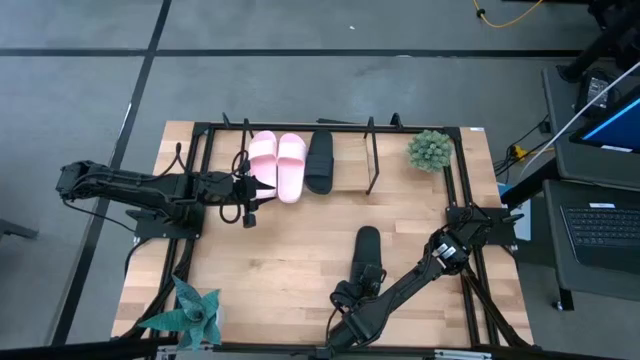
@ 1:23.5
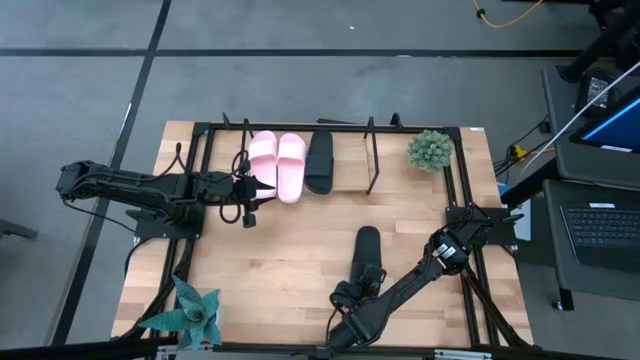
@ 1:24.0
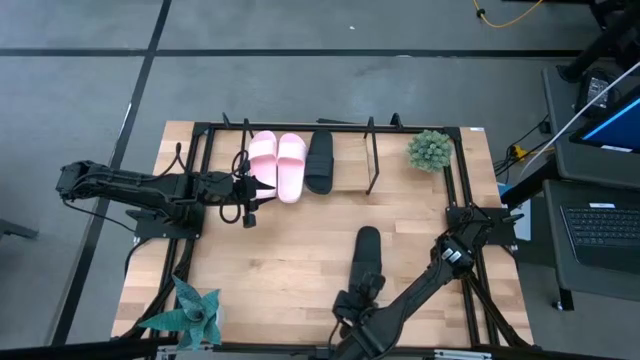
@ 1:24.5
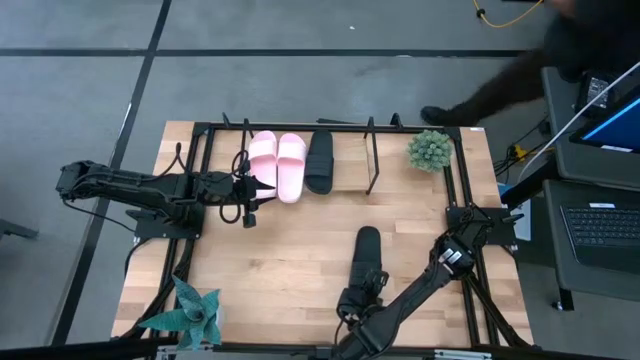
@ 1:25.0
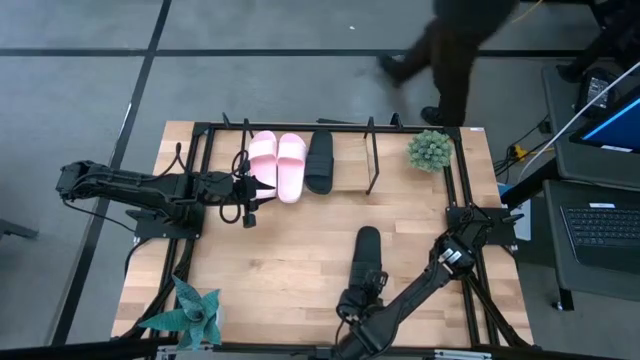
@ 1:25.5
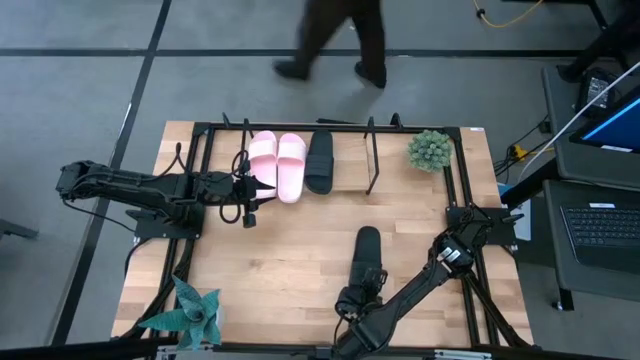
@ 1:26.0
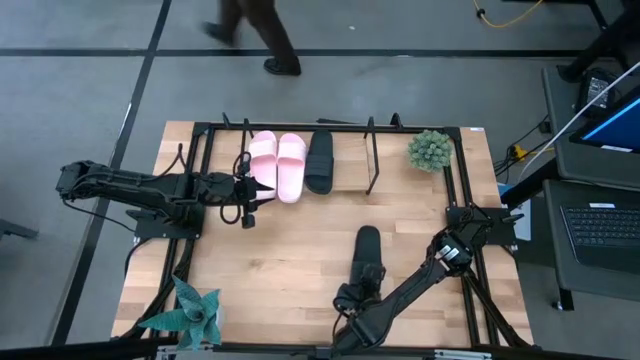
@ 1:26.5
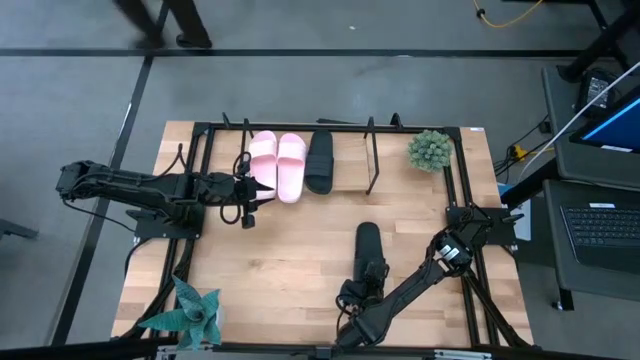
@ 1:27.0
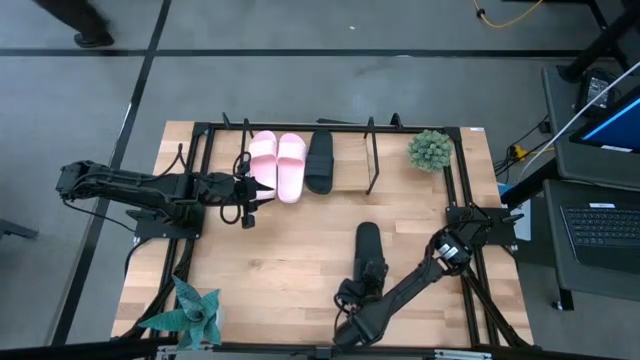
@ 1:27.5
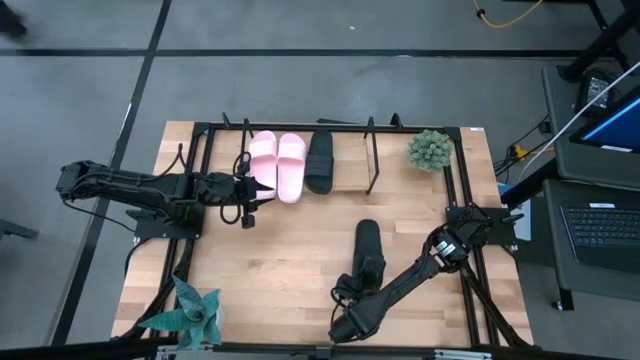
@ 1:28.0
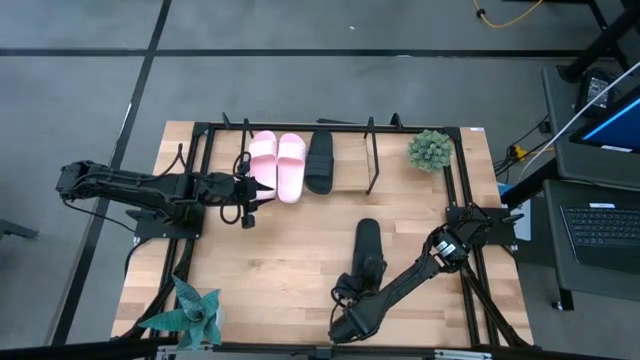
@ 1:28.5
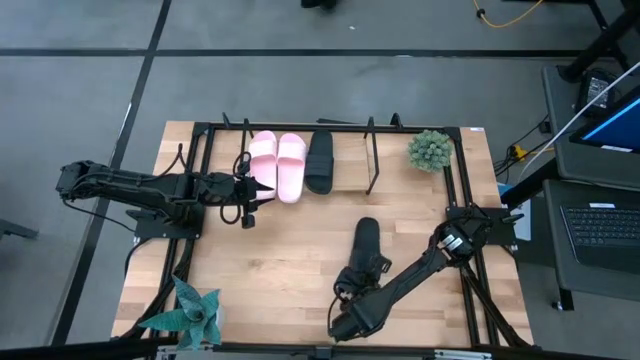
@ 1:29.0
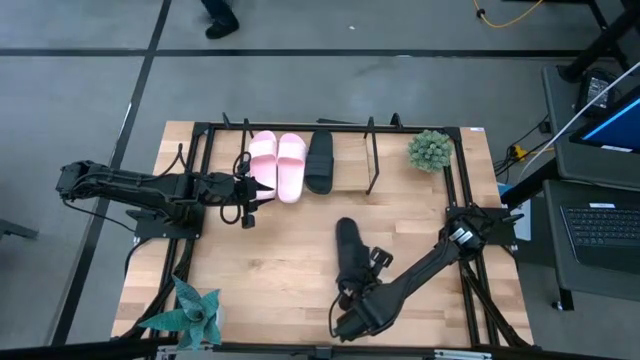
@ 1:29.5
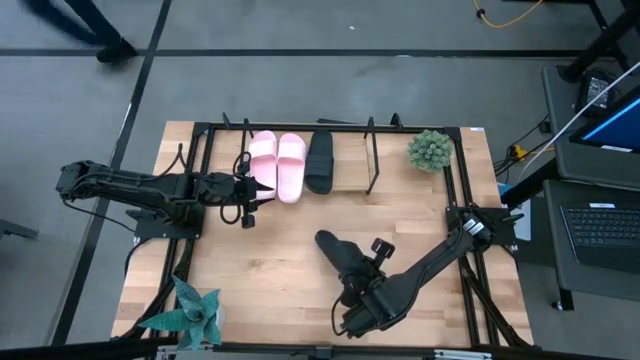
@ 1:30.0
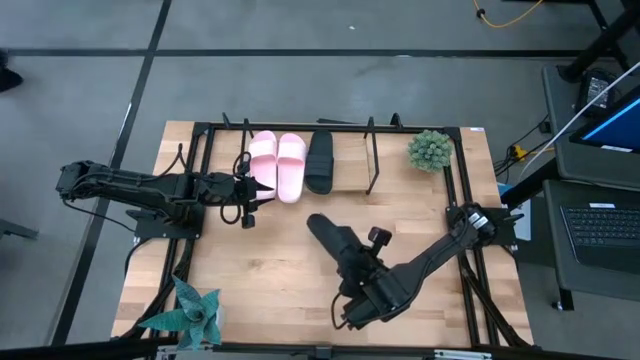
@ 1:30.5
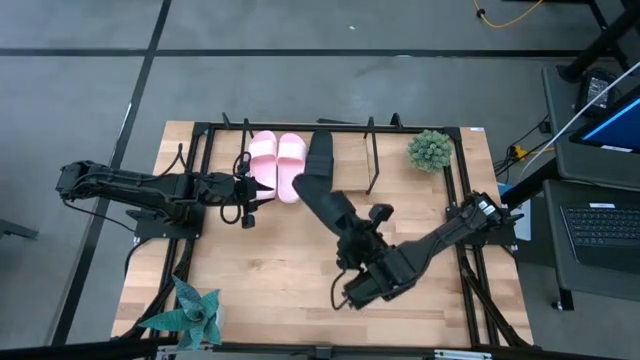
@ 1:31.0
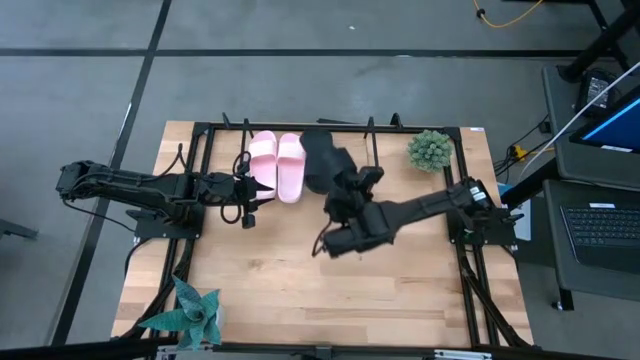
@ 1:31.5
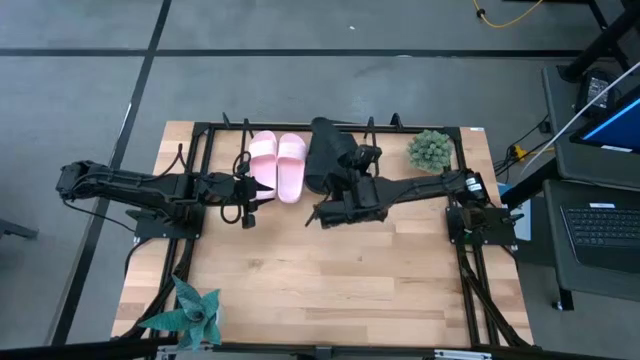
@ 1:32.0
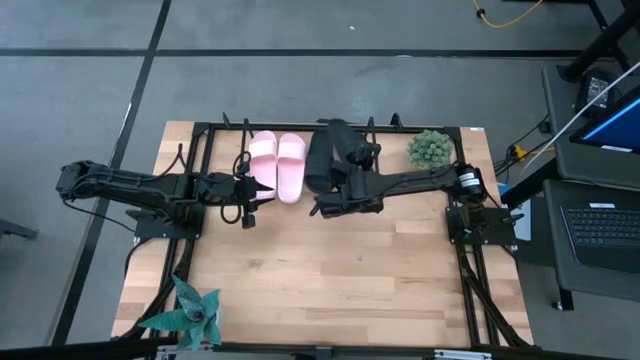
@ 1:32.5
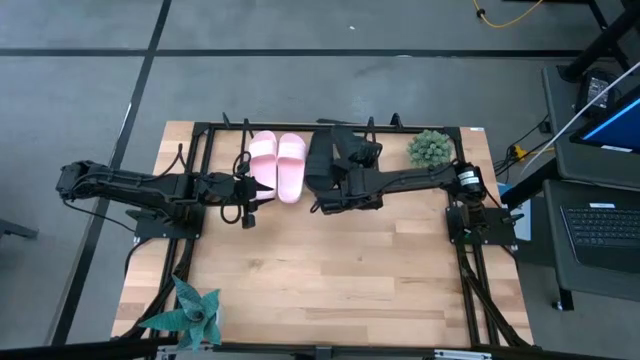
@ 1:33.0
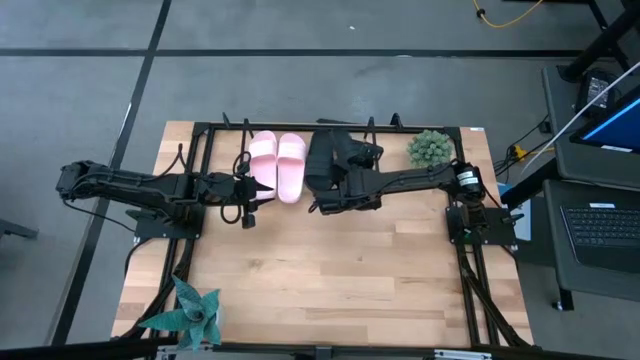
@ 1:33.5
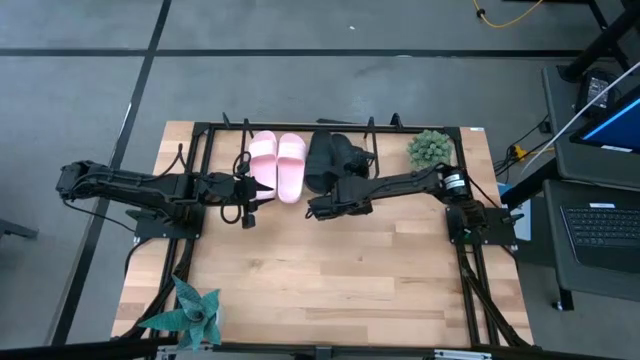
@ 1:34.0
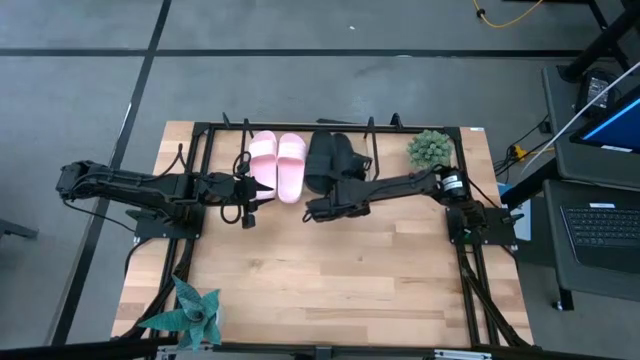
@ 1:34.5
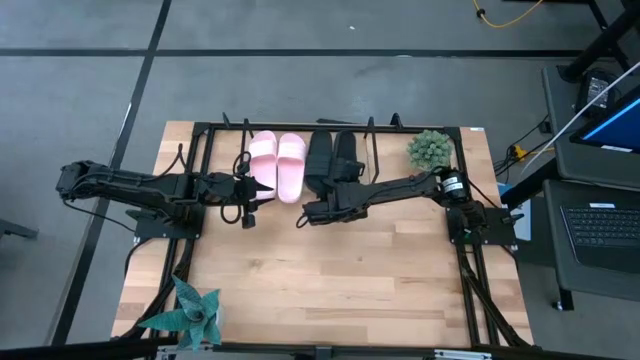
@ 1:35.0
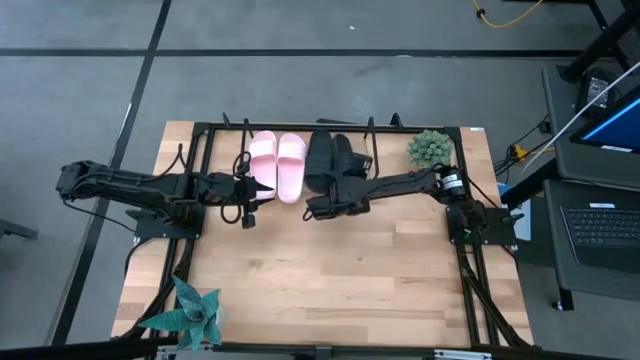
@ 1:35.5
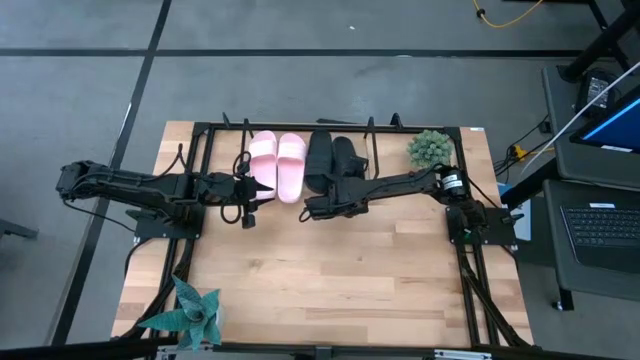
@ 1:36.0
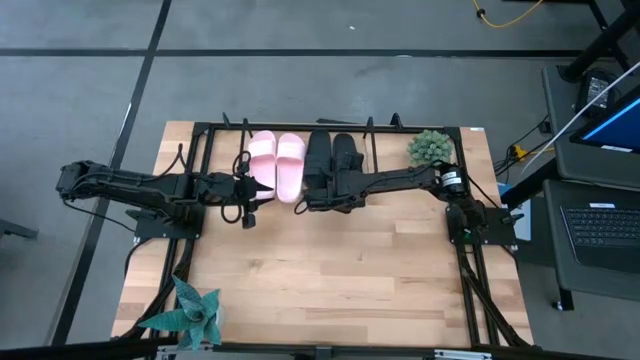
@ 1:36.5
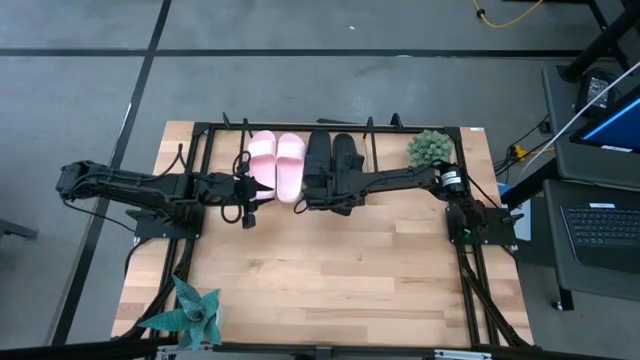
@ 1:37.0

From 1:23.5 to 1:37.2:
Task: Pick and place slides into the shelf
Put the black slide on the shelf

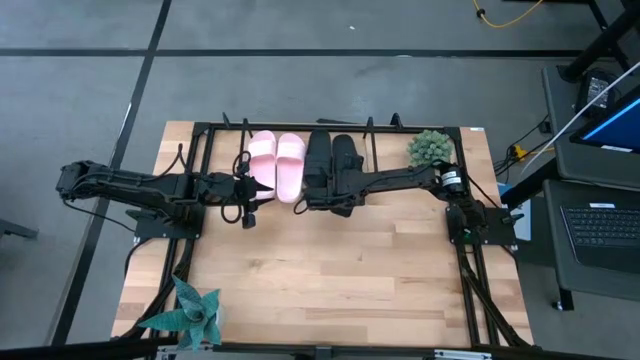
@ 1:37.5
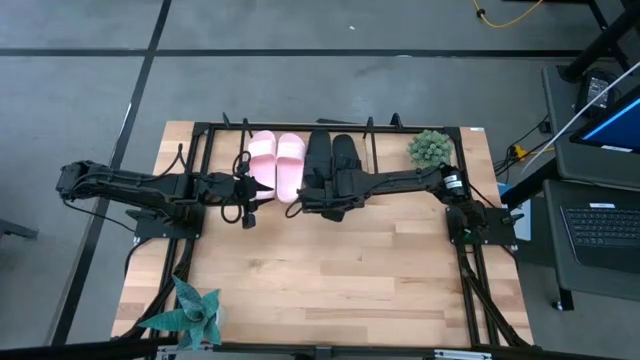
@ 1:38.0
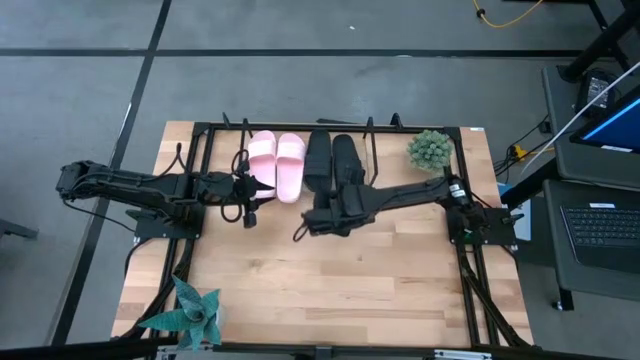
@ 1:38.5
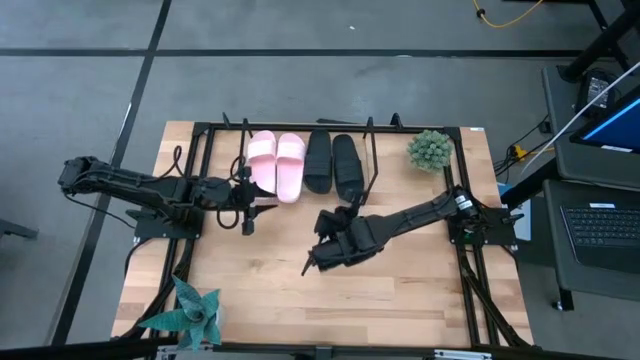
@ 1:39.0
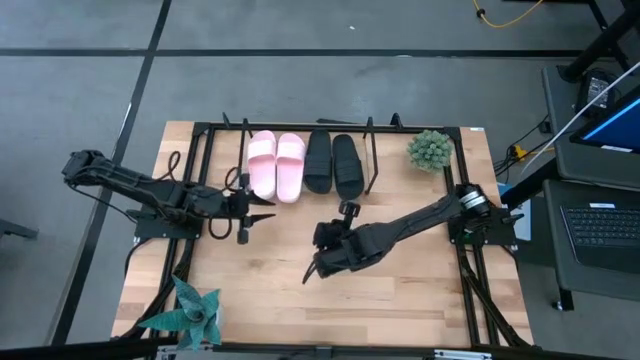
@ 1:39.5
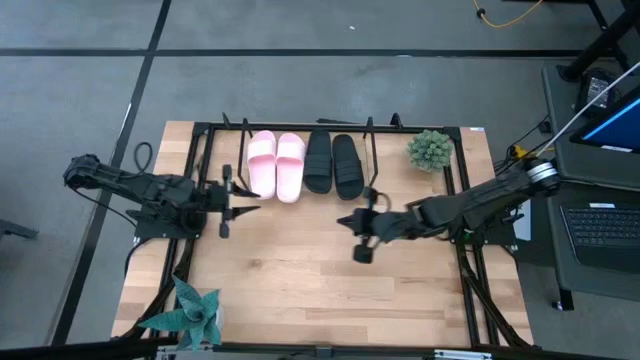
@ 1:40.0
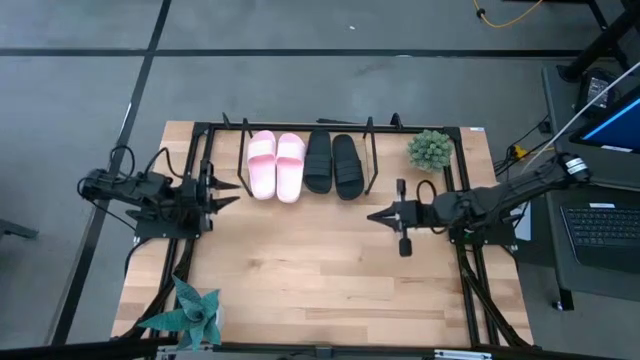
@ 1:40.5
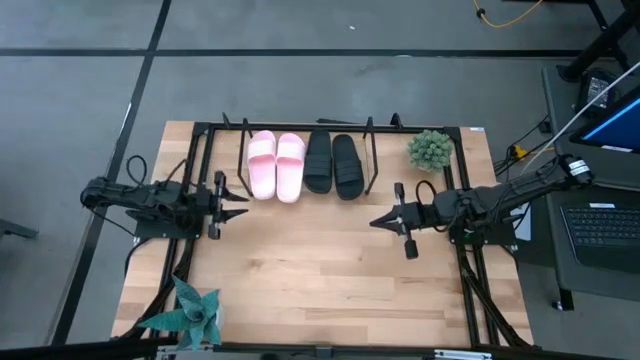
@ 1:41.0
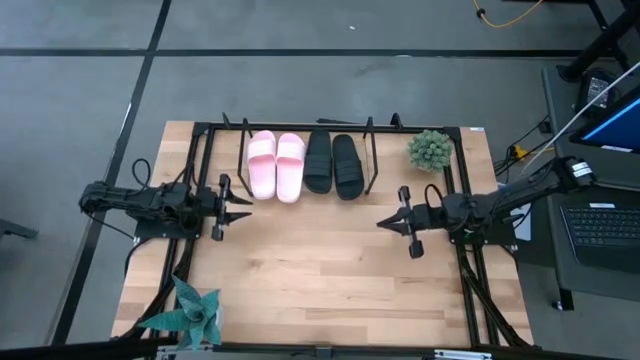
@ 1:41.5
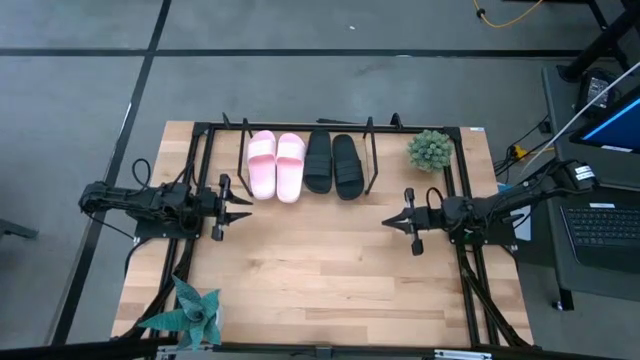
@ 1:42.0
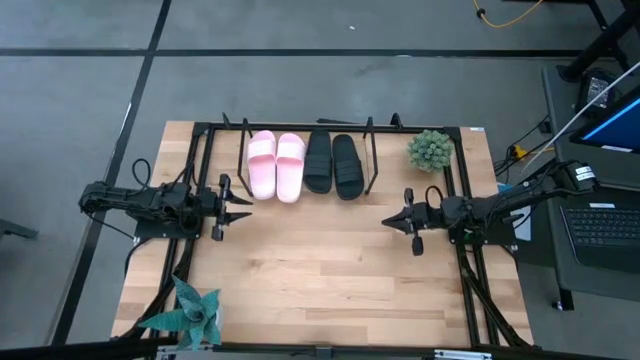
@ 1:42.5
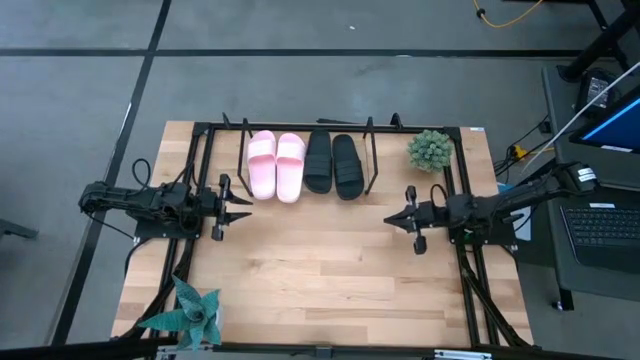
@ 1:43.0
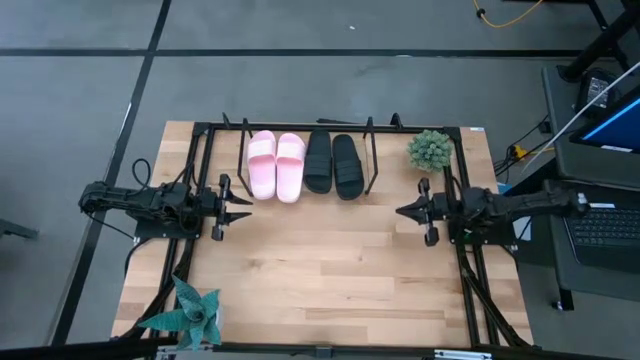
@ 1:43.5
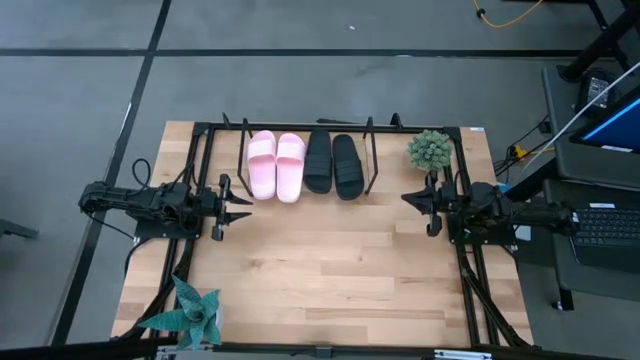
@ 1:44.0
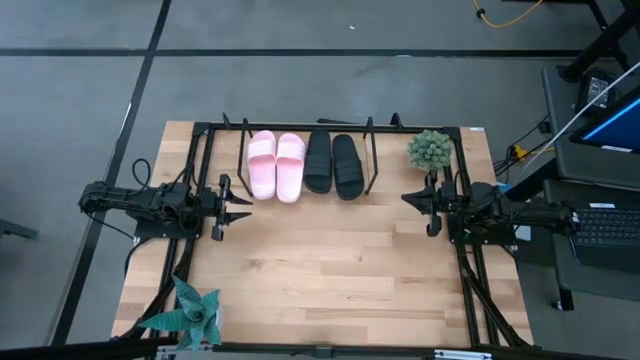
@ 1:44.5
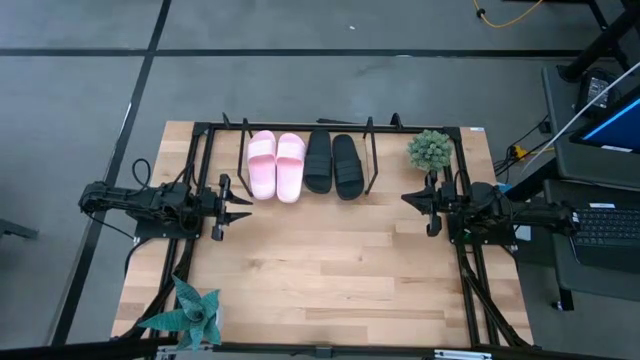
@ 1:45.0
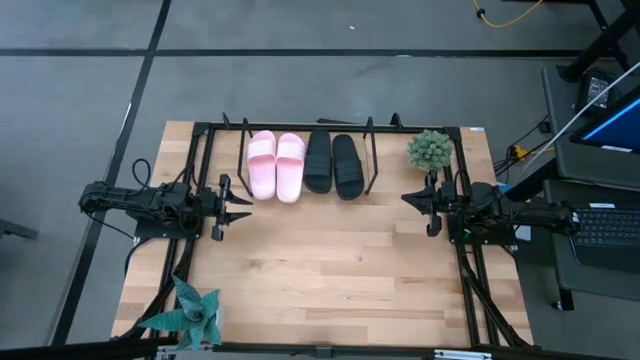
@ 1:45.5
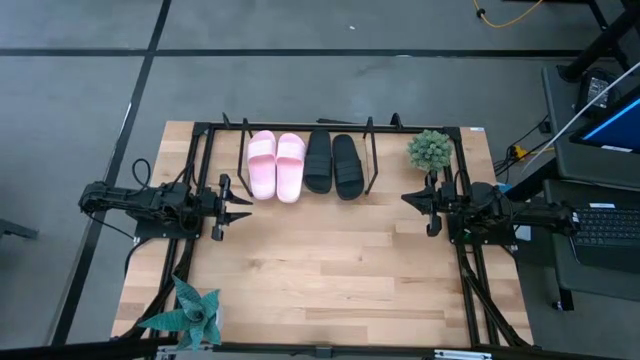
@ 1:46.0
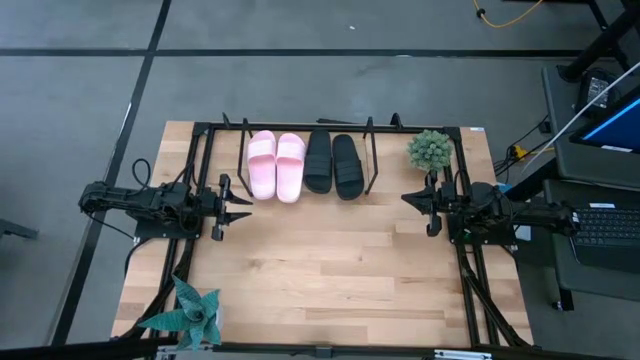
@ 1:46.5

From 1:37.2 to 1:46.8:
Return to Home Position
